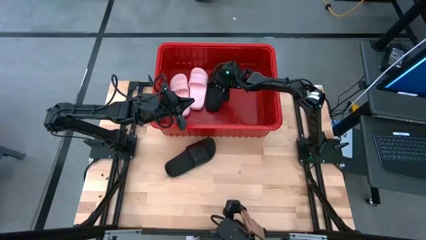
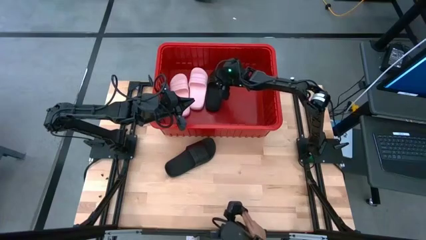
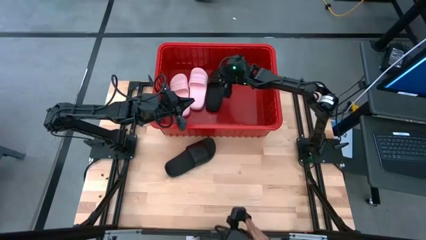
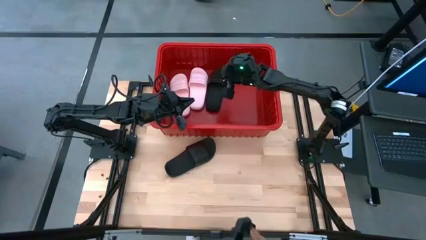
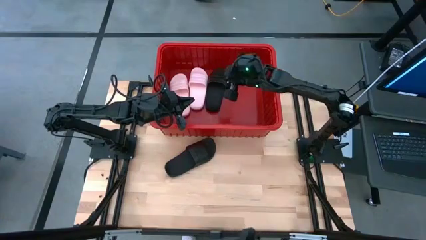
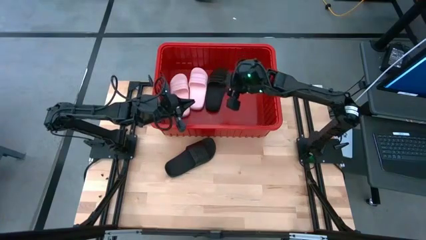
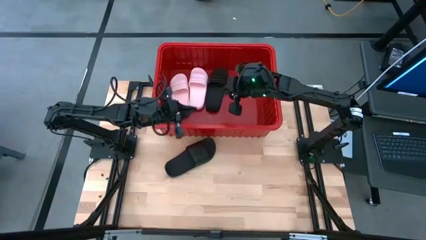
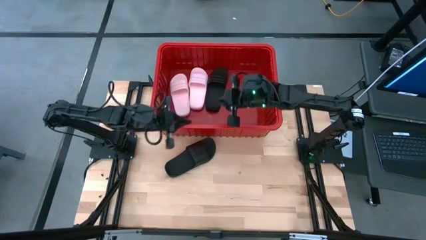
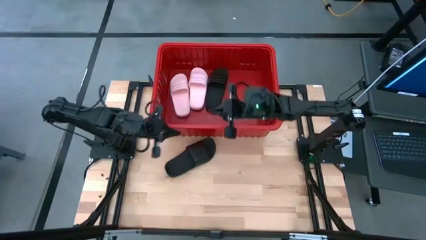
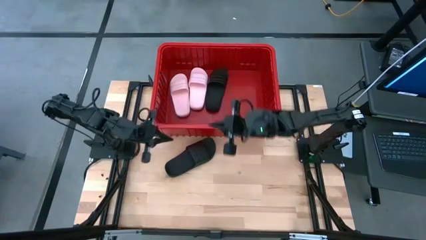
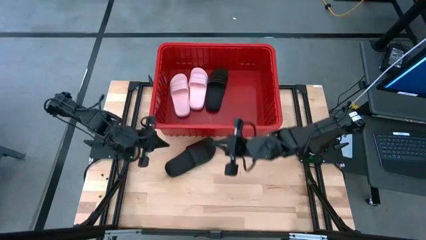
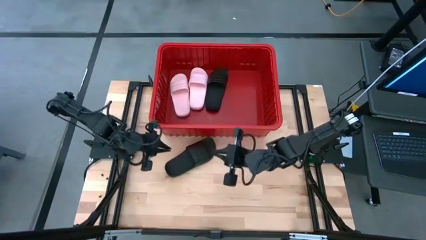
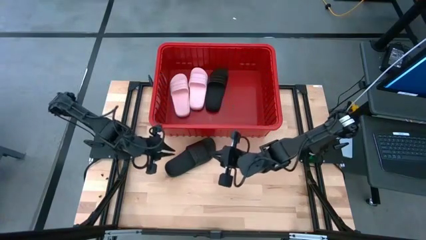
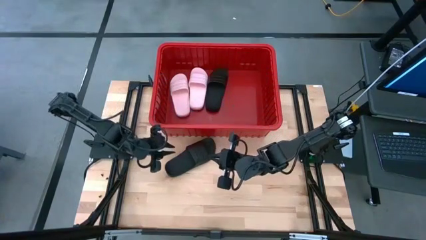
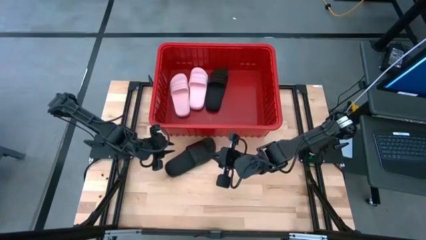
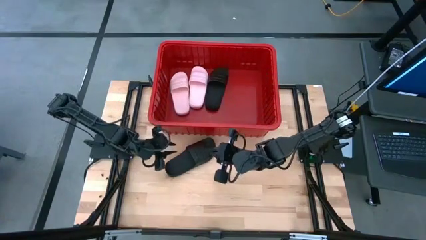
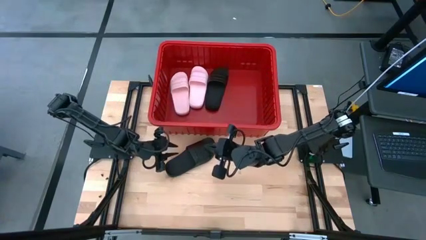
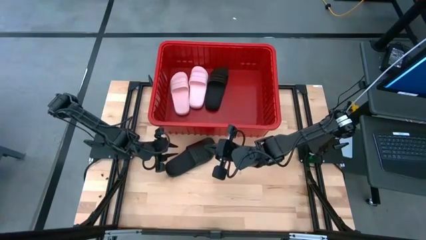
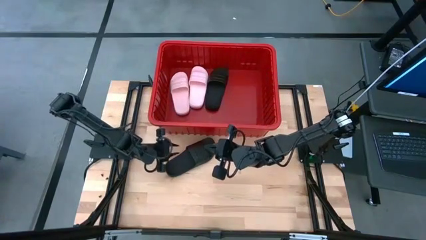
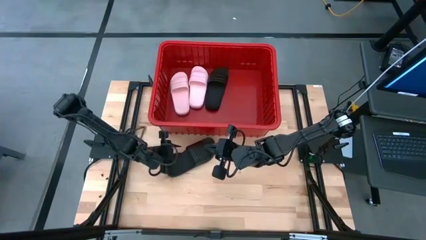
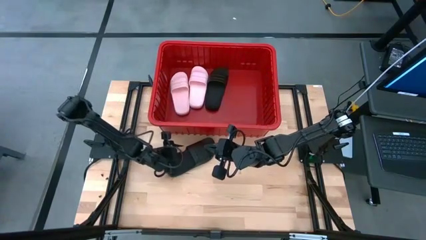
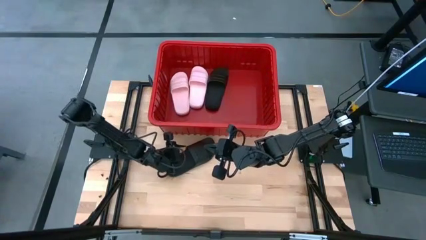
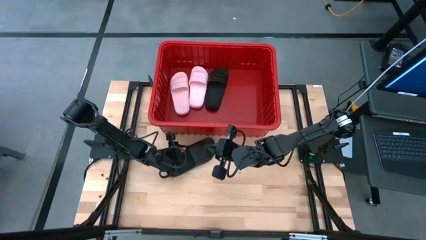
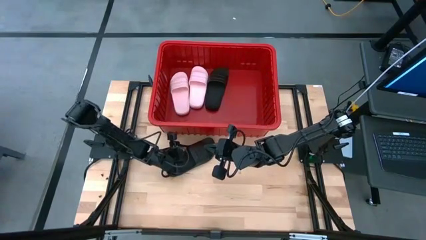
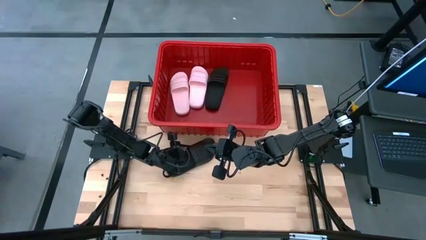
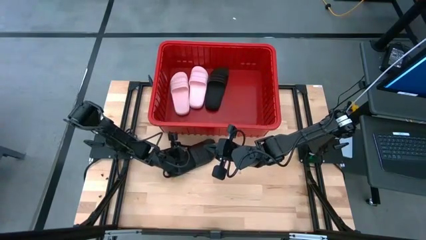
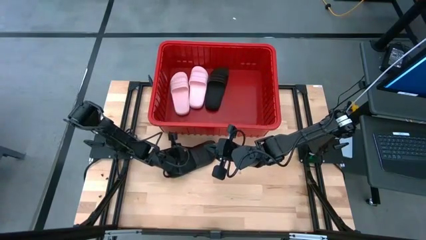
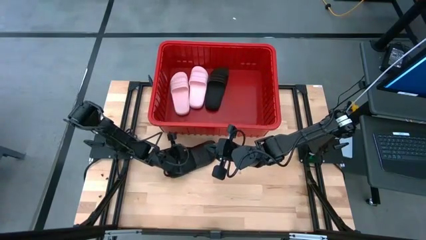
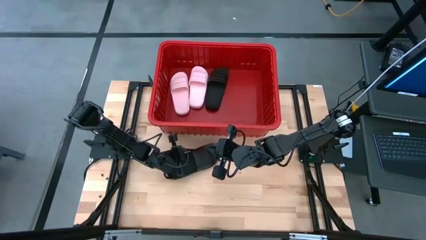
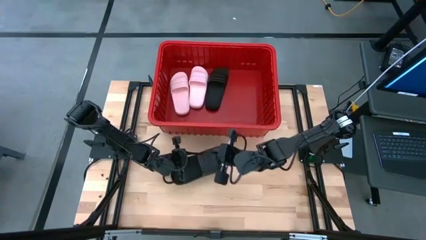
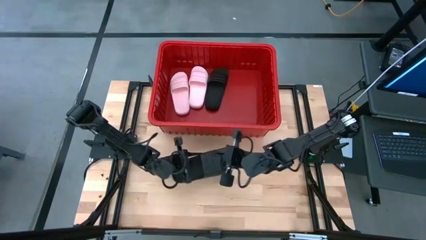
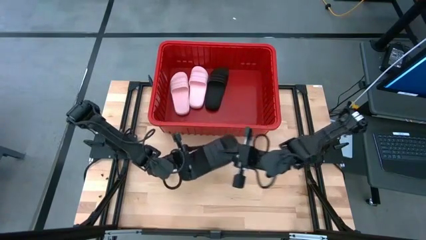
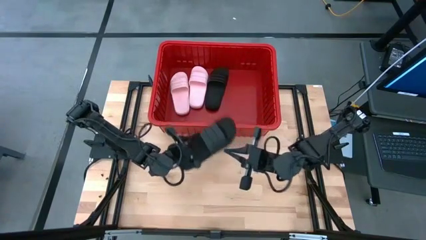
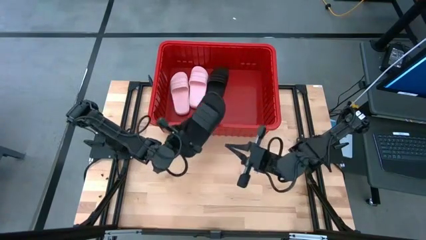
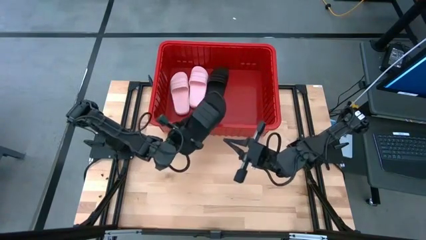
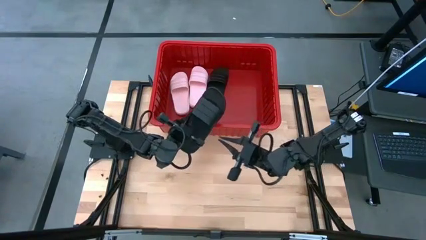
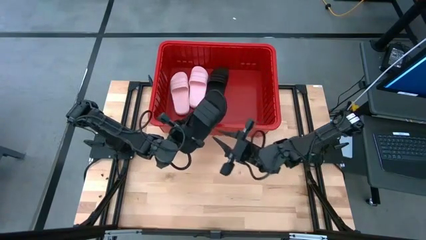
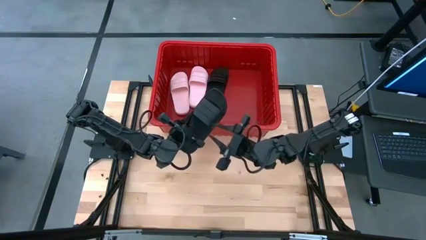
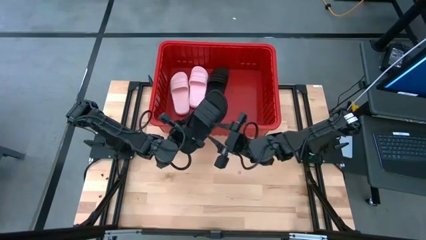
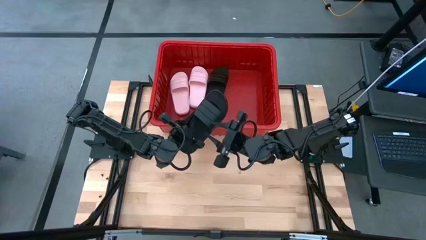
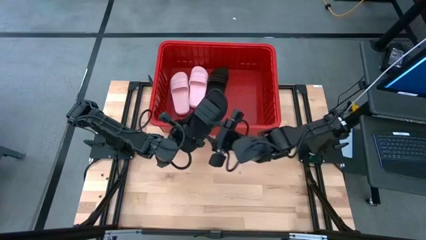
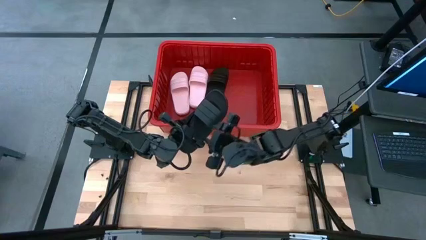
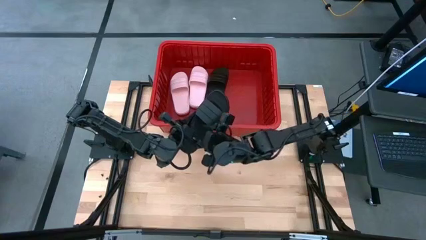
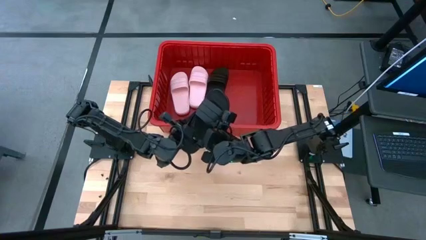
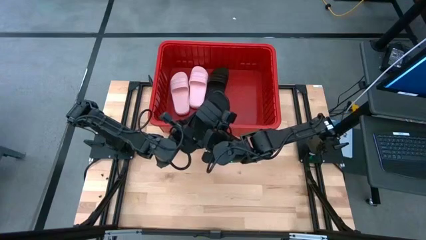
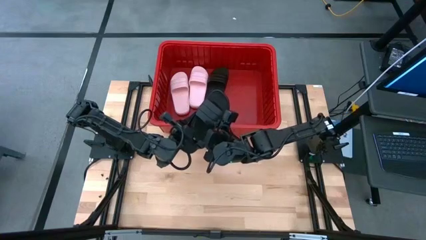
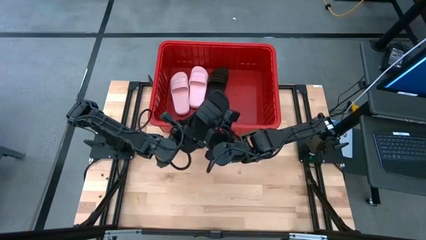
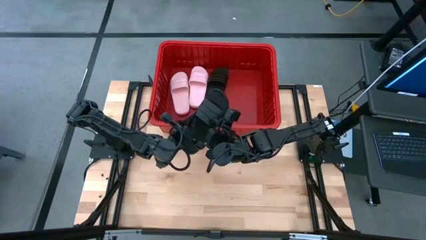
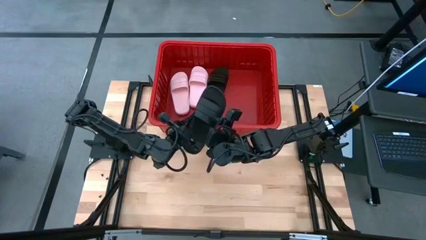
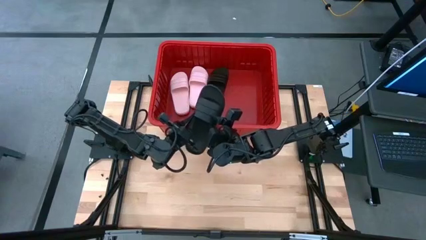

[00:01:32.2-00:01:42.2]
Task: Pick and place slides into bin
Put the black slide into the red bin

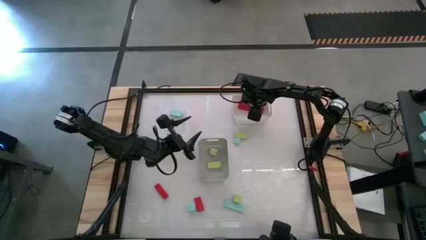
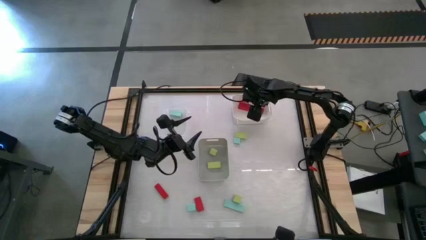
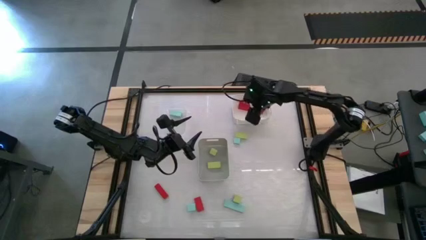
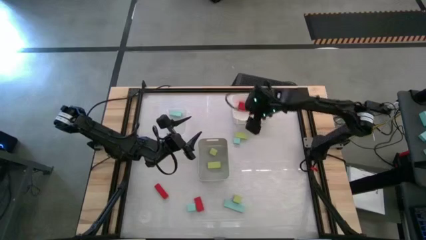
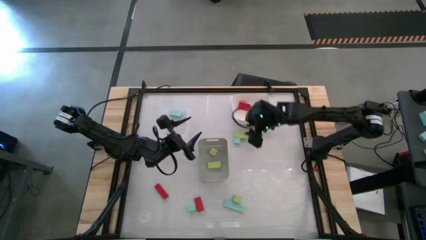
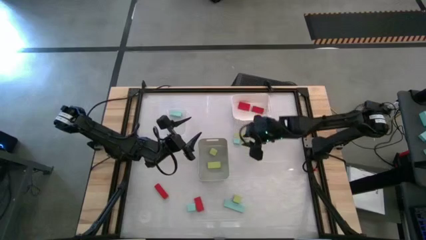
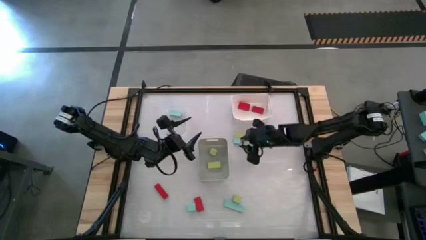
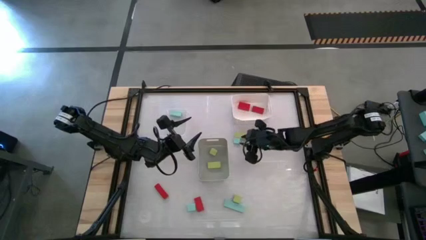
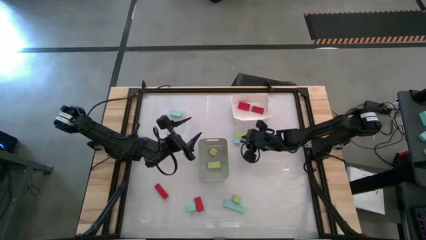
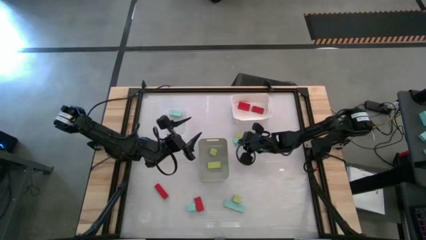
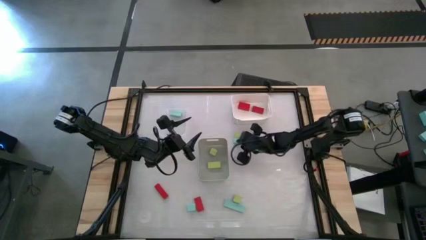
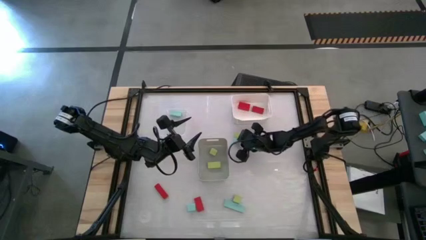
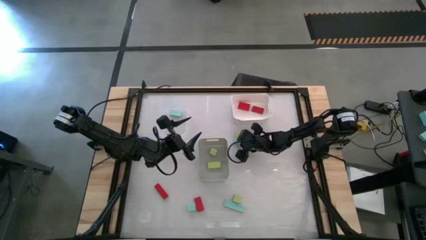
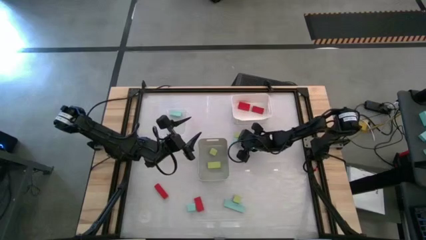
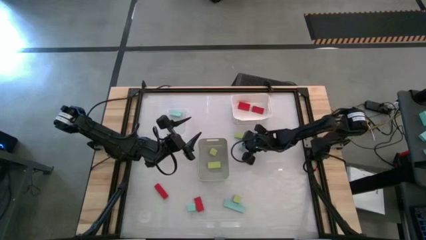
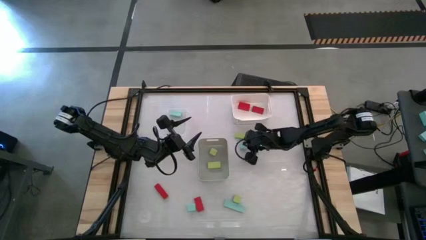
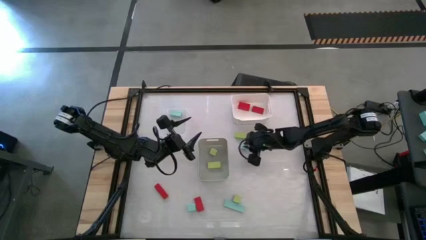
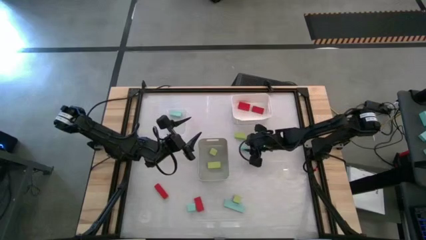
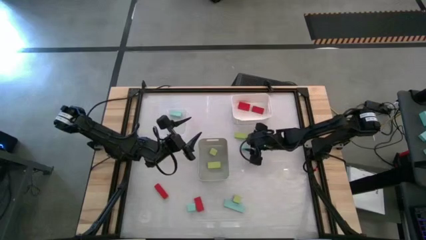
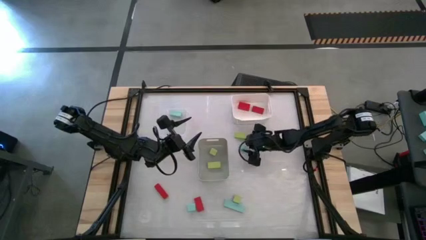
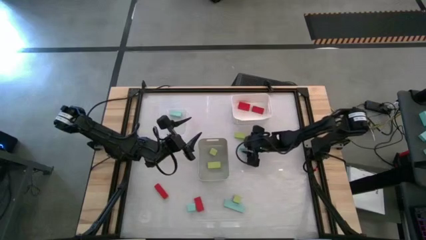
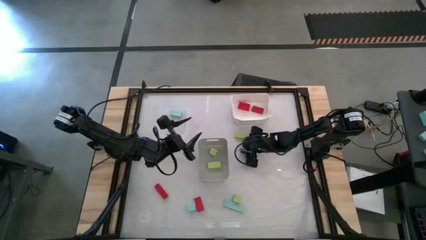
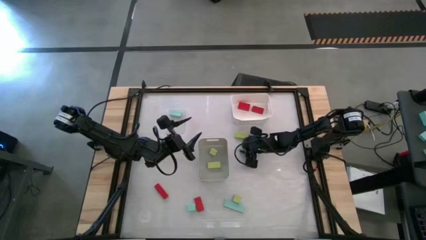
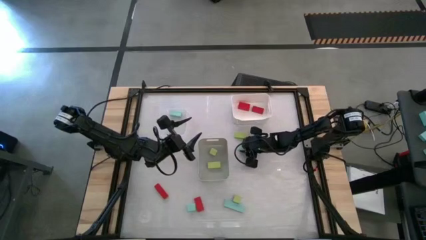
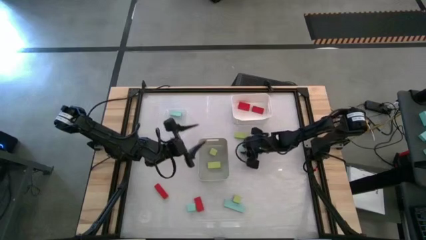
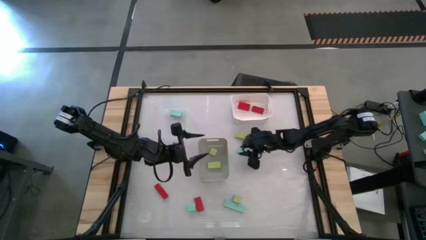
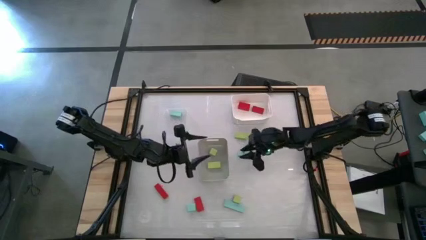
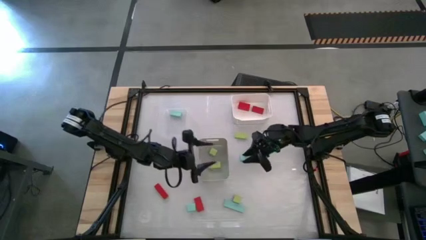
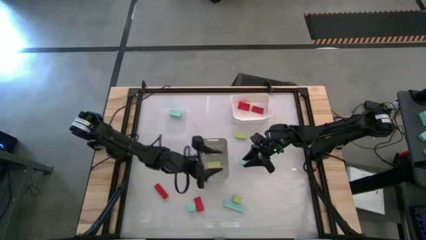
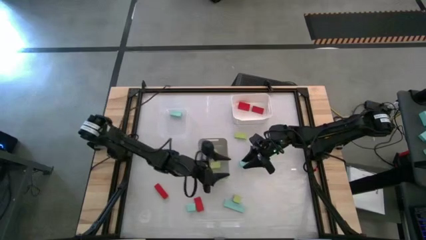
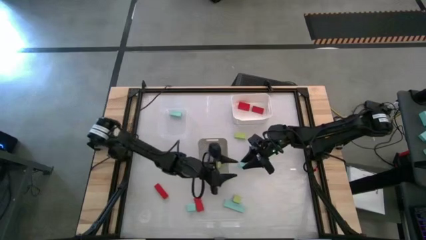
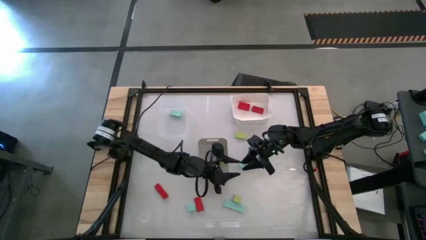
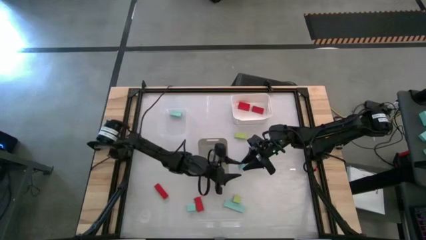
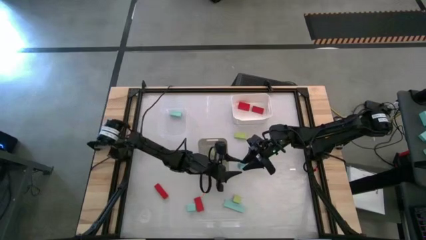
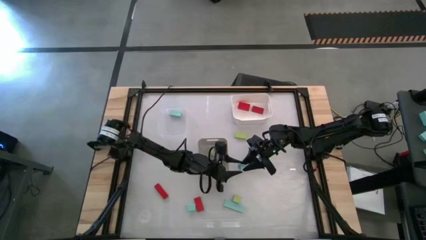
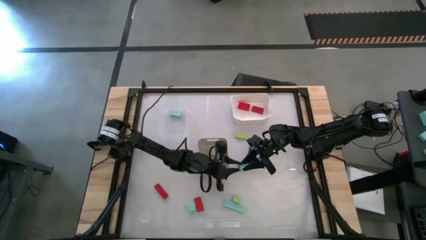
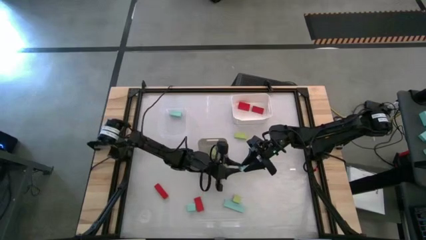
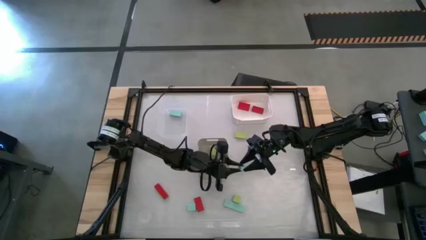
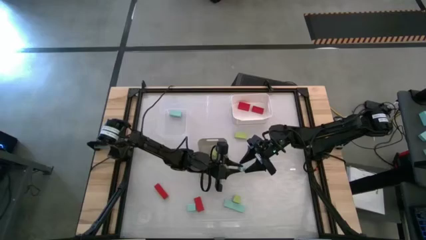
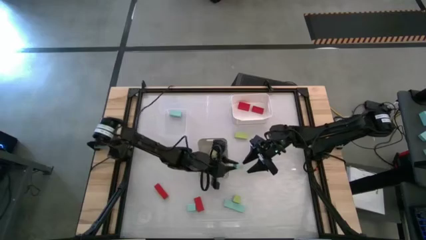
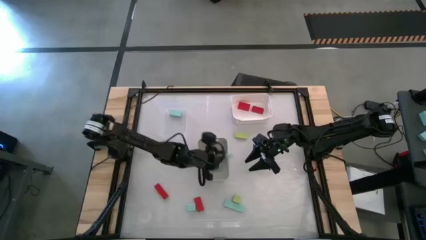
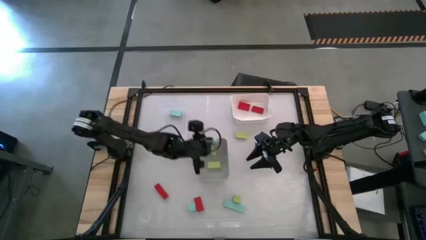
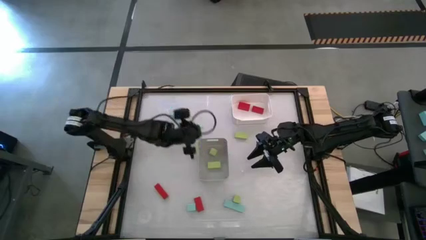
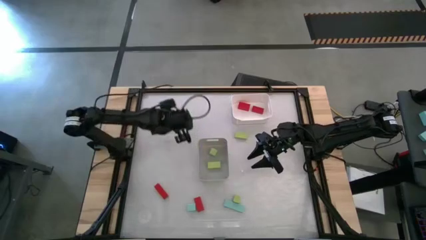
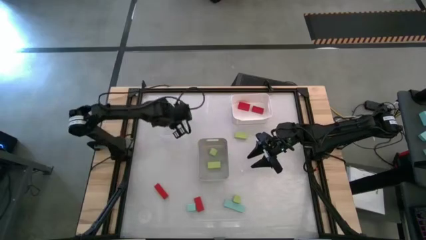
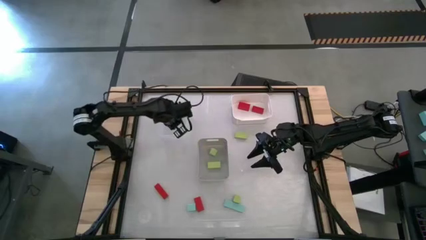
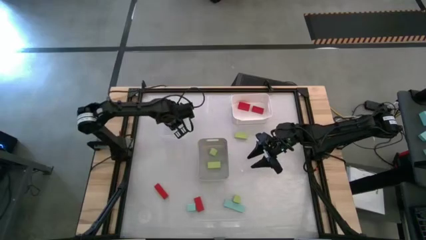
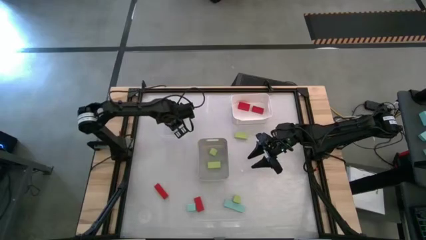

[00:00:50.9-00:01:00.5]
Task: Sort & place blocks by color
Put the blue block into the transparent bin
